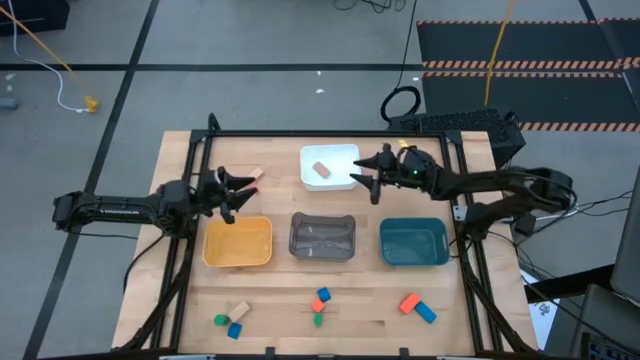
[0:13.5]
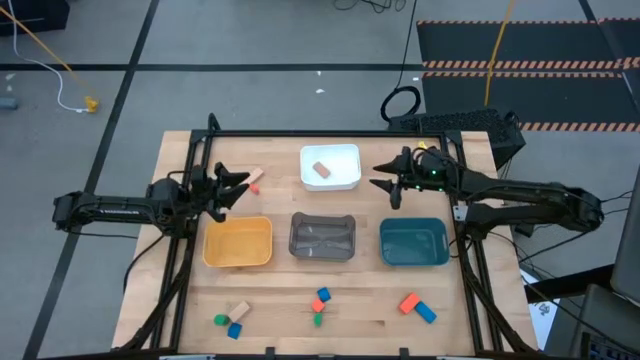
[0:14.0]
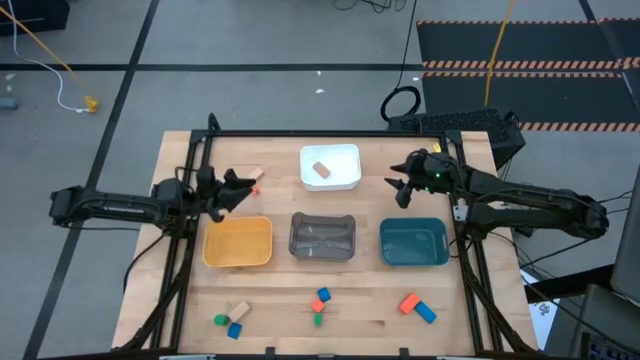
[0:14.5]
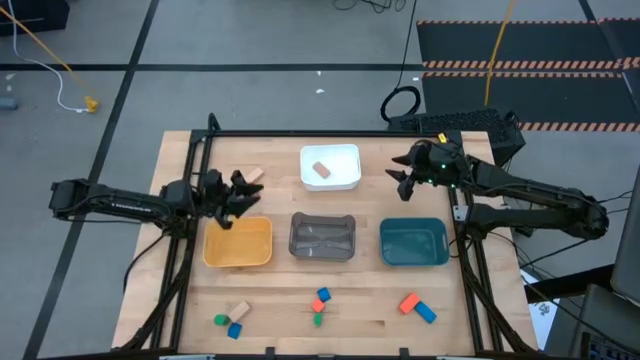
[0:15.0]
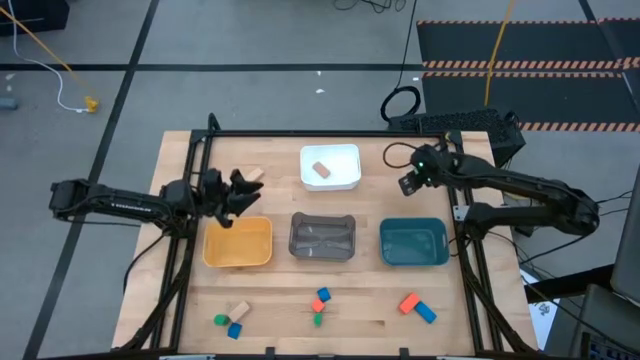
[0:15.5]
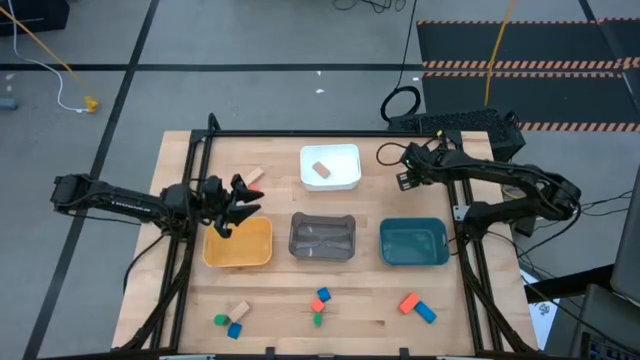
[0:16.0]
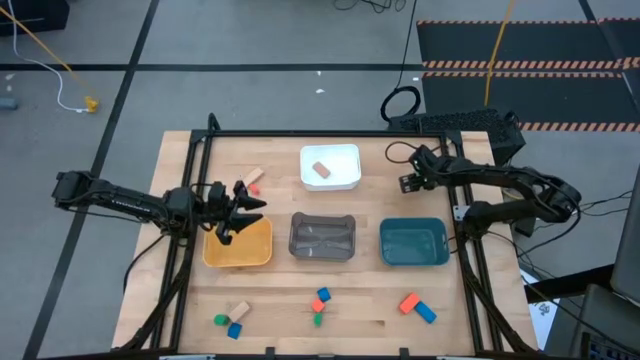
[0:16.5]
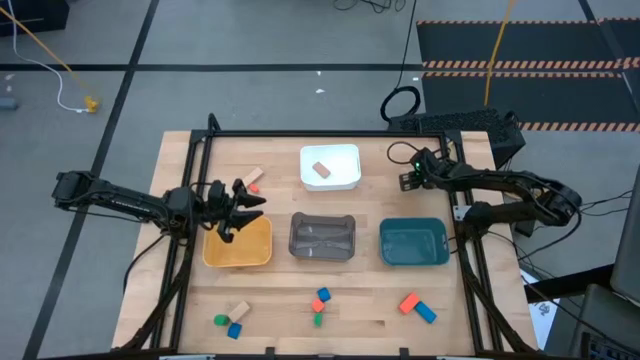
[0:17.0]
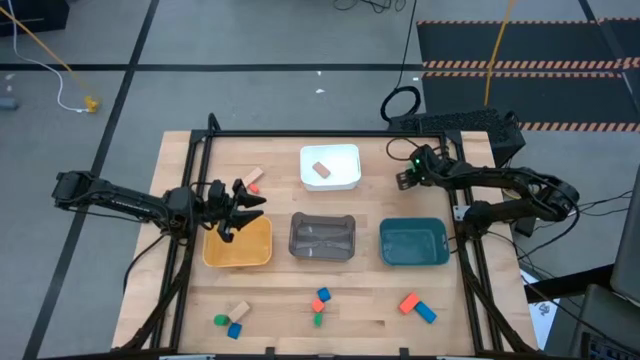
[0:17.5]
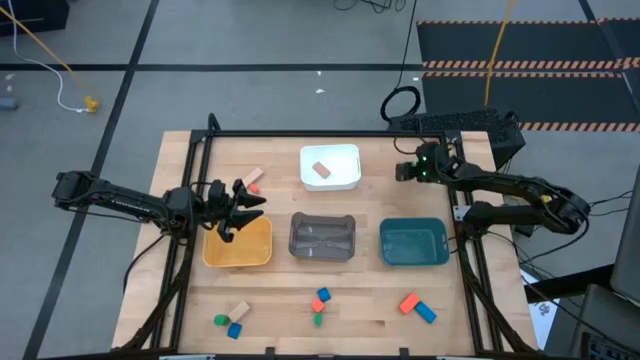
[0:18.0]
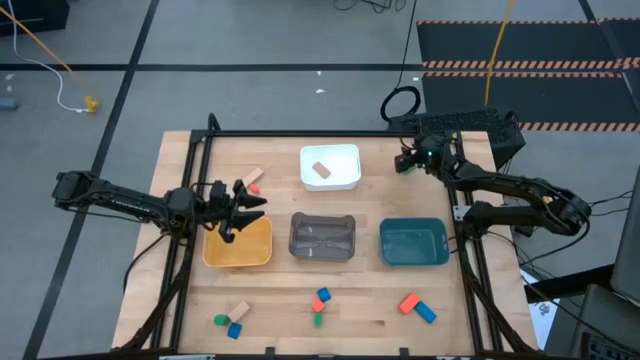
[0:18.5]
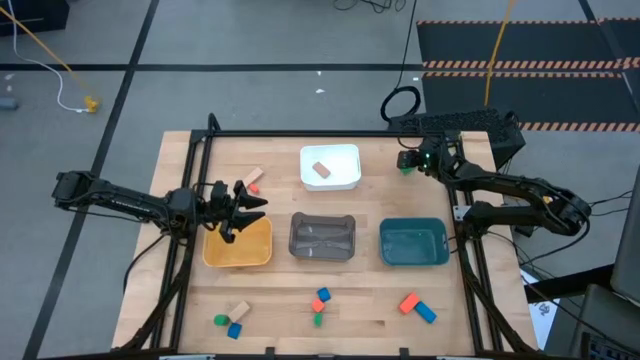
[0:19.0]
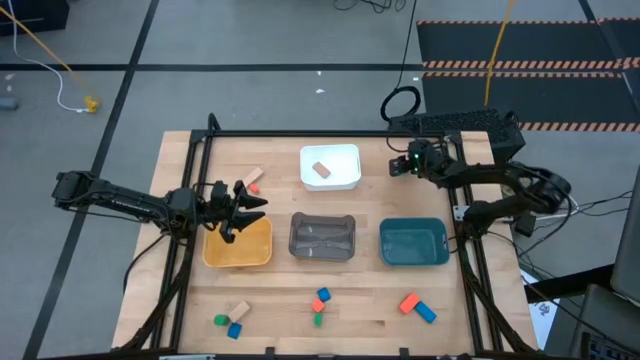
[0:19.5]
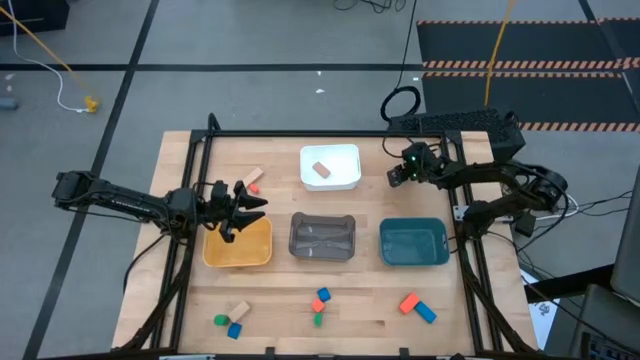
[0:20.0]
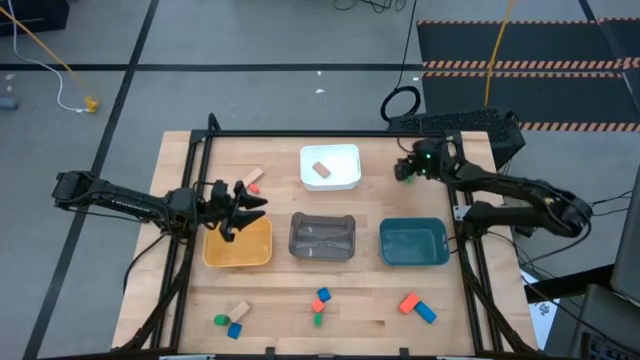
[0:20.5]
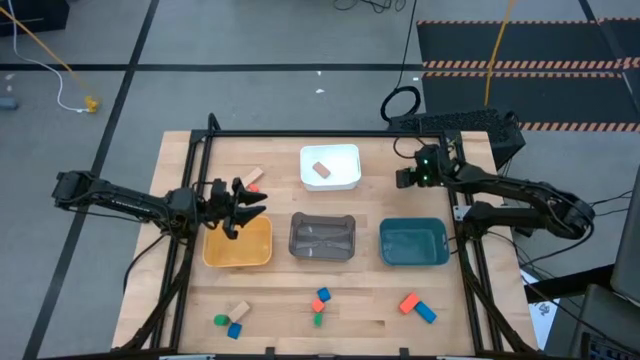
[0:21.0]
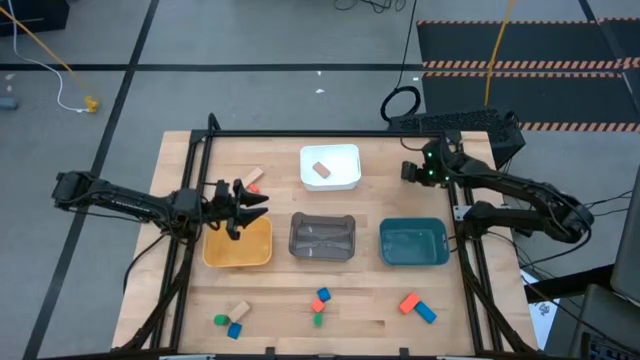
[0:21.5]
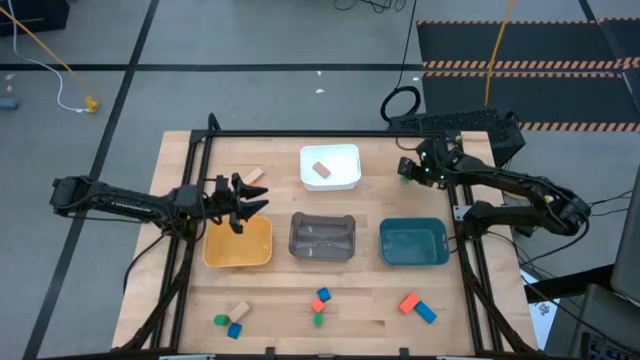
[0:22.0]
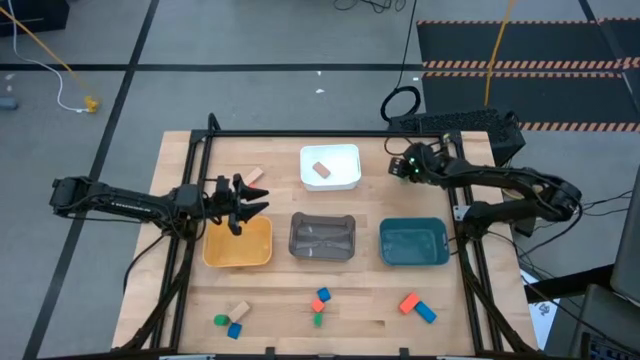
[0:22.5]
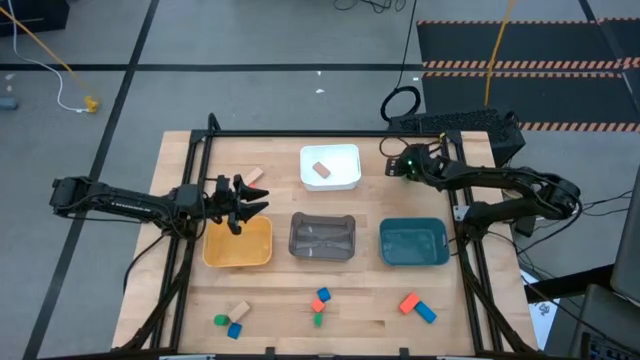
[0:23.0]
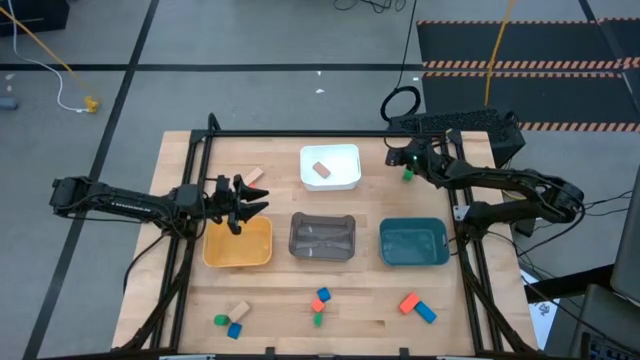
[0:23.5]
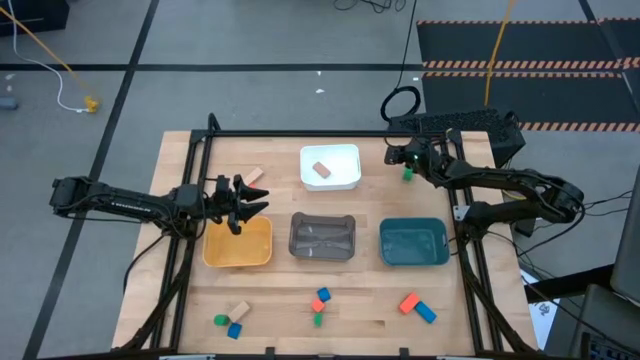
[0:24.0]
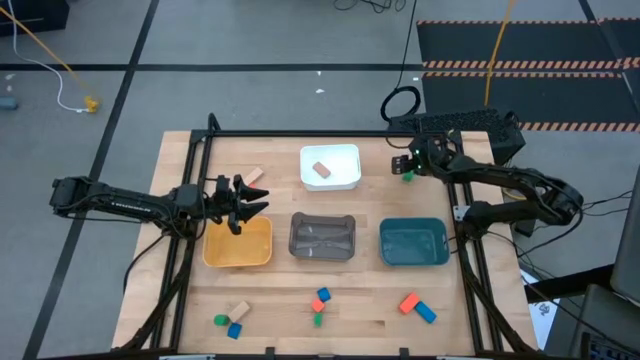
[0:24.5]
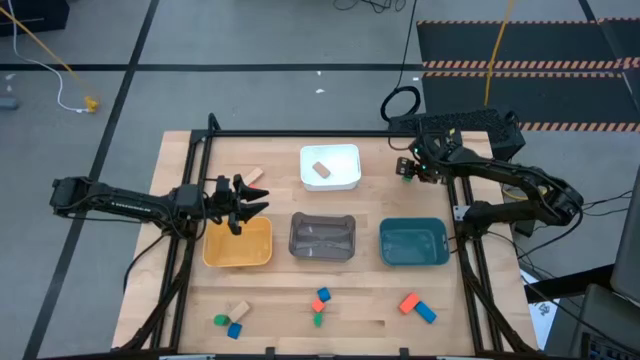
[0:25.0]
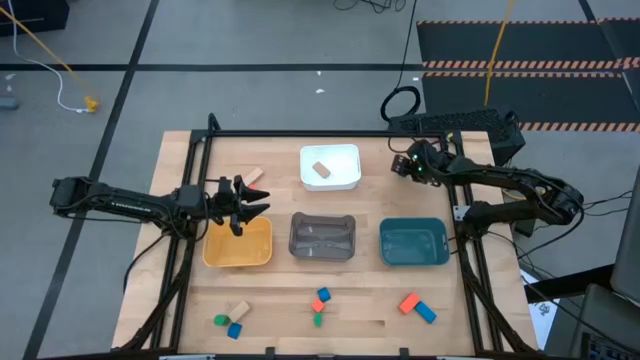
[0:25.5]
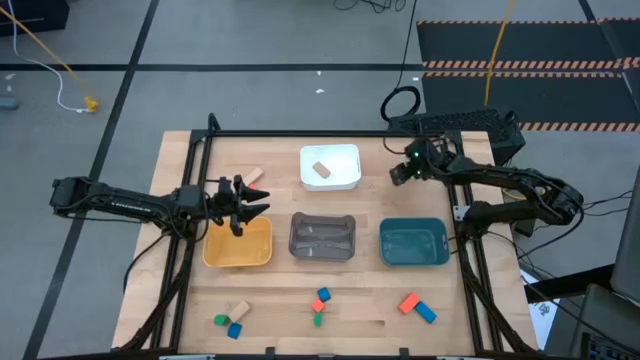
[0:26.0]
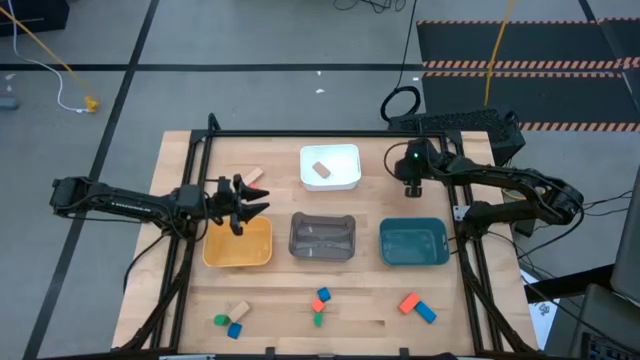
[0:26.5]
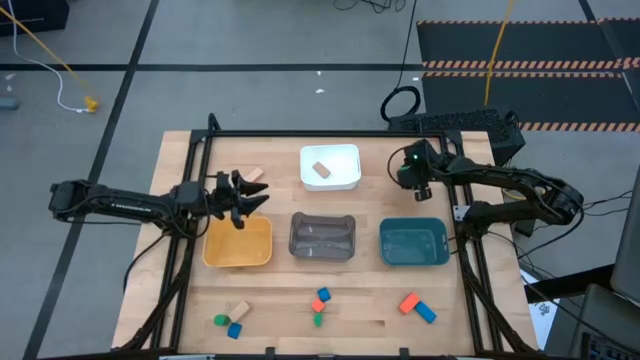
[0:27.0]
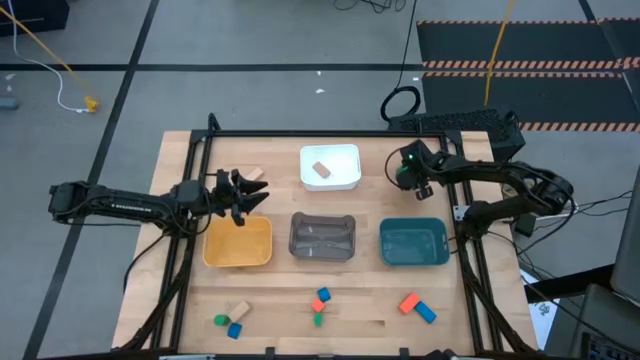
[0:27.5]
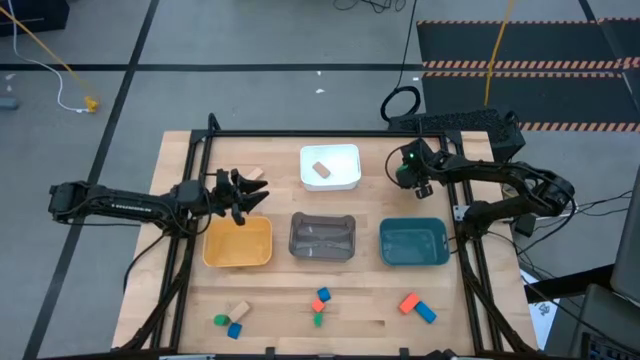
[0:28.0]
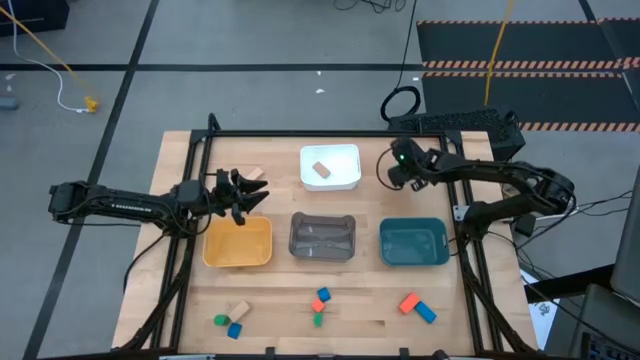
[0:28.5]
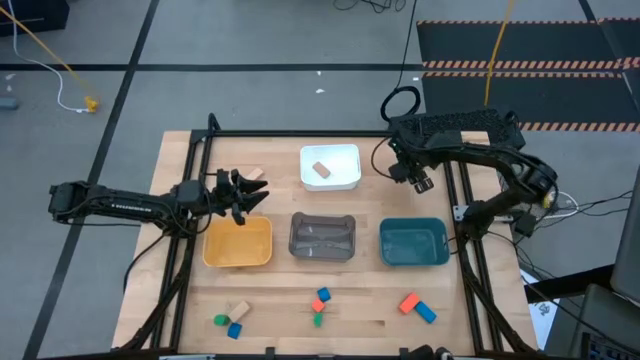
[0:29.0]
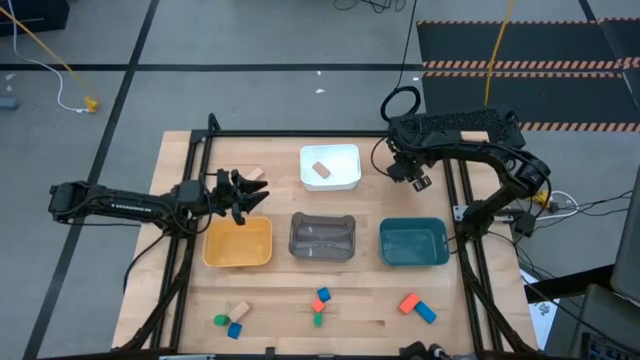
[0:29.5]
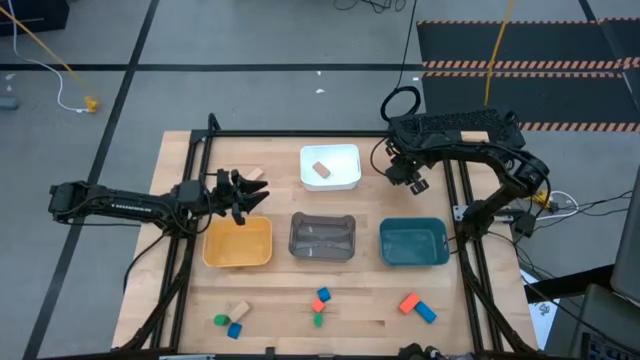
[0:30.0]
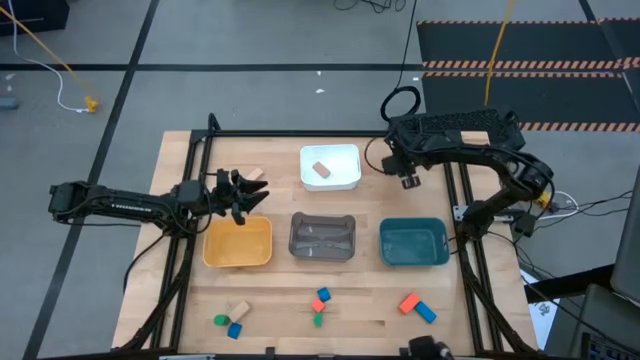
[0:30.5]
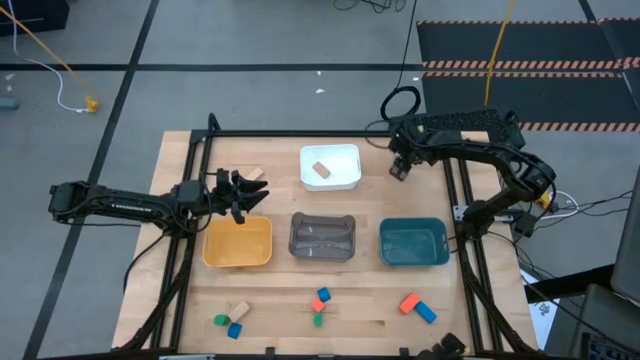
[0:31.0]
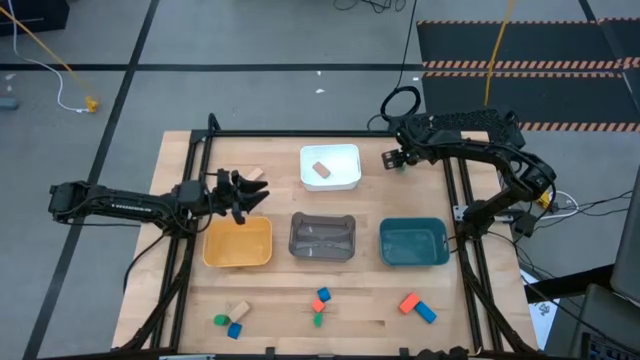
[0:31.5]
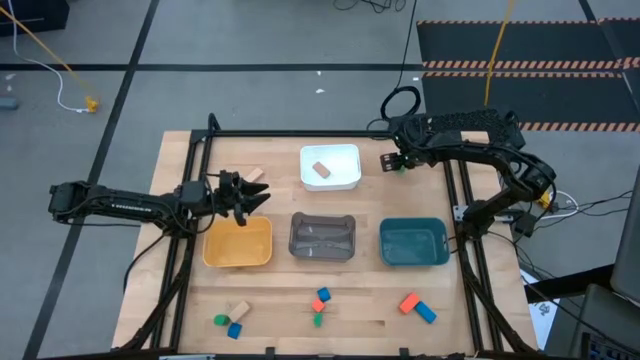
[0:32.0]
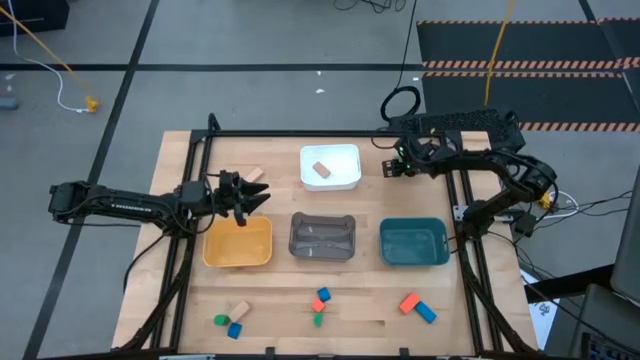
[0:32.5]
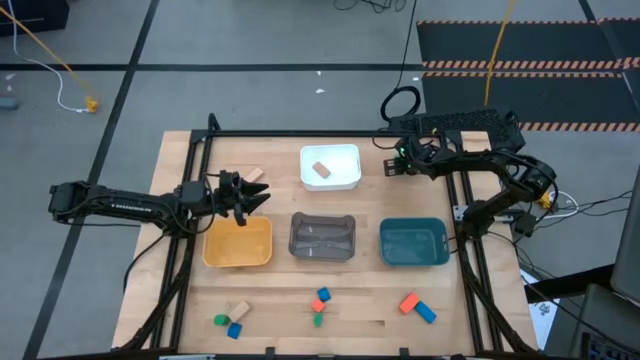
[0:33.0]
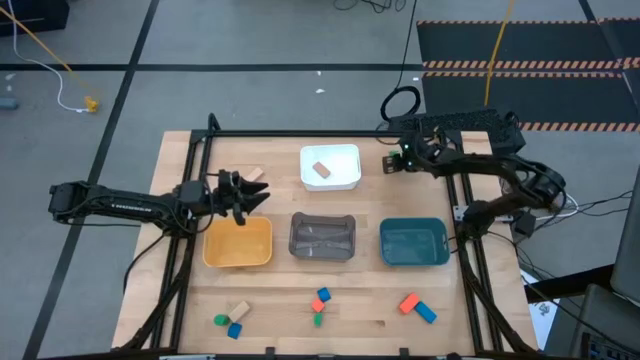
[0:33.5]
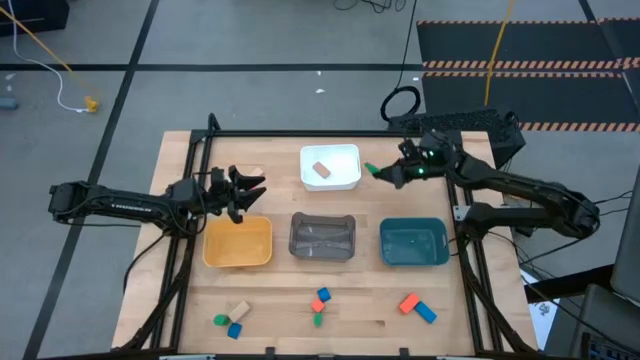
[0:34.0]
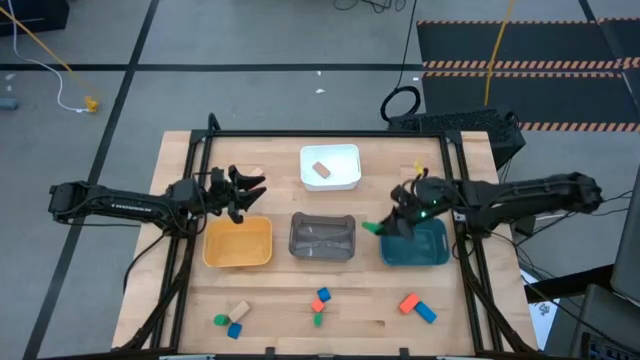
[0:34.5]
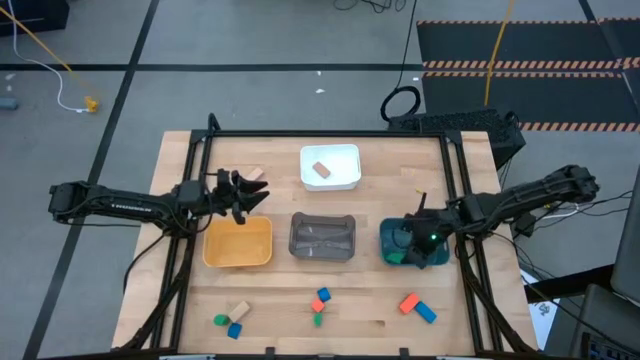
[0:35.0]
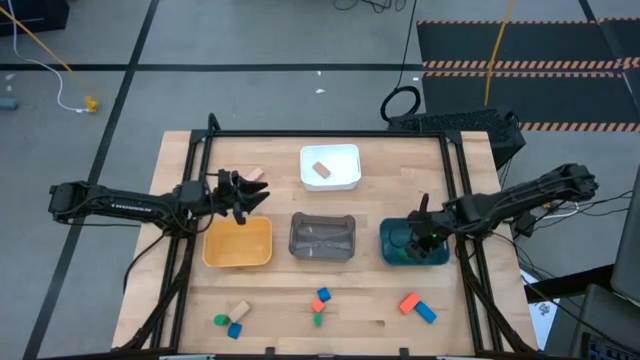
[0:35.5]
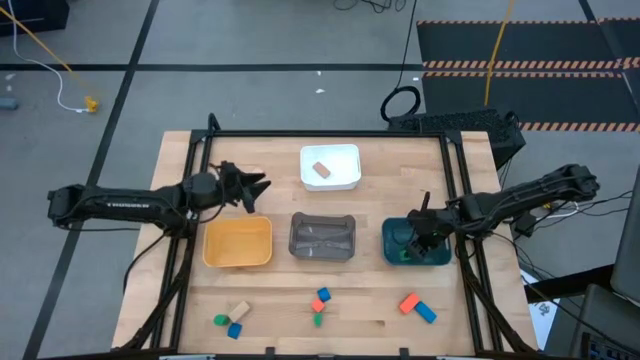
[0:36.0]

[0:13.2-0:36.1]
Task: Sort & place blocks by color
Put the top green triangular block into the dark blue bin
